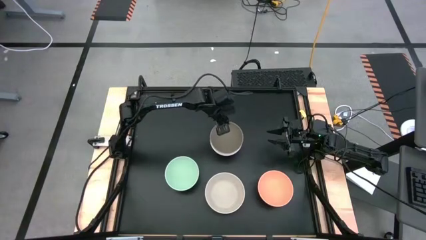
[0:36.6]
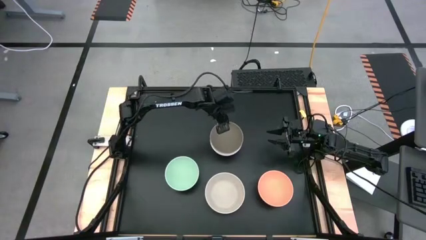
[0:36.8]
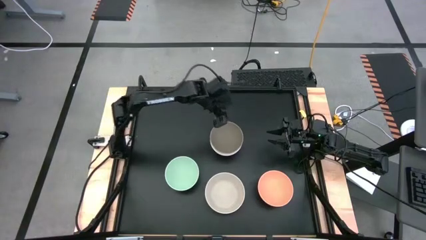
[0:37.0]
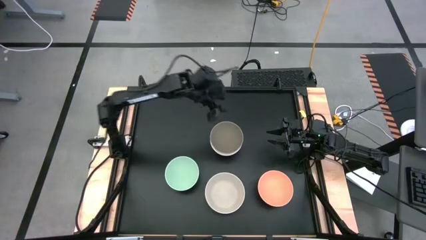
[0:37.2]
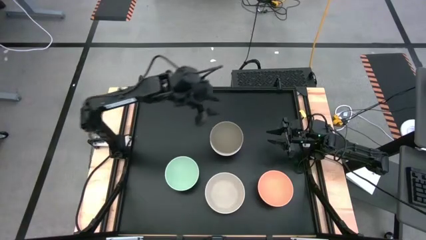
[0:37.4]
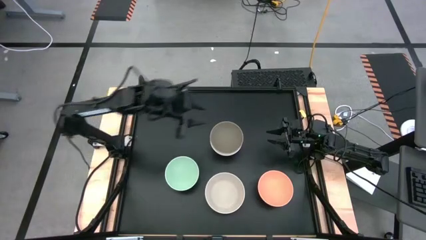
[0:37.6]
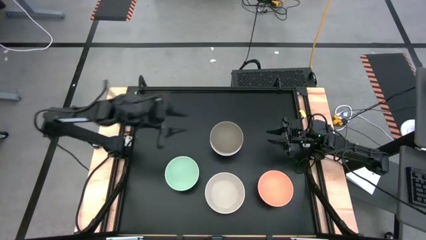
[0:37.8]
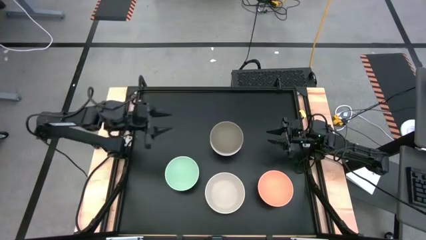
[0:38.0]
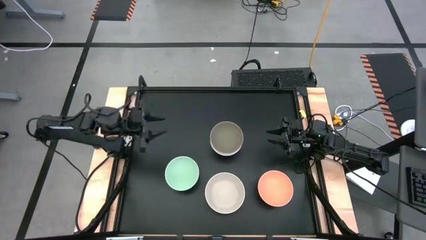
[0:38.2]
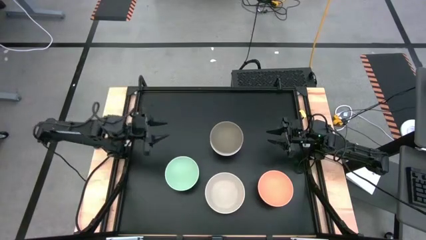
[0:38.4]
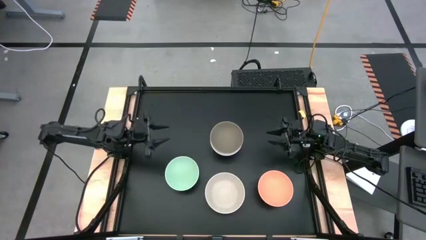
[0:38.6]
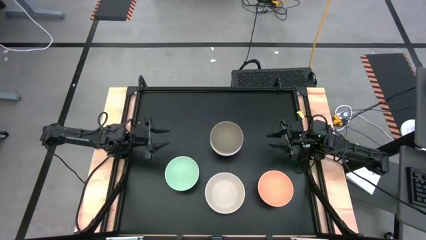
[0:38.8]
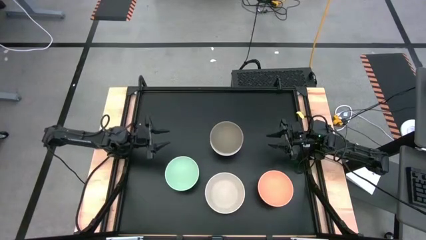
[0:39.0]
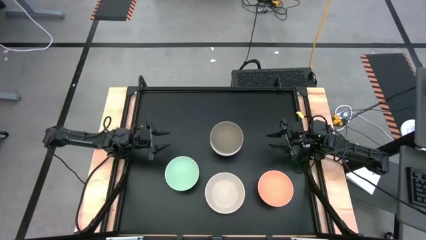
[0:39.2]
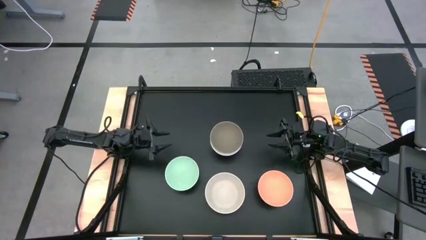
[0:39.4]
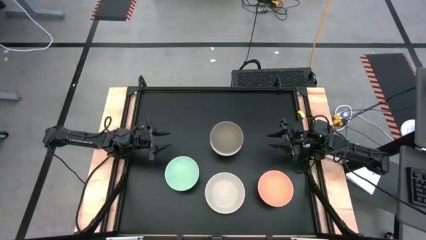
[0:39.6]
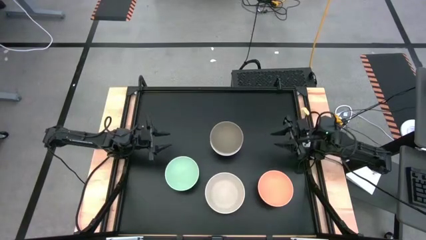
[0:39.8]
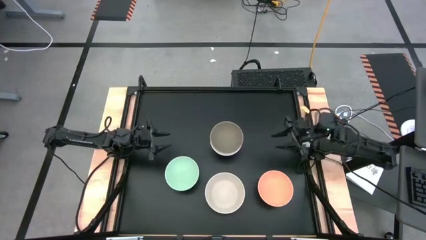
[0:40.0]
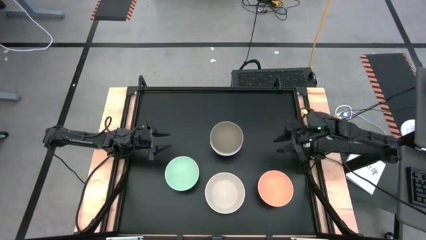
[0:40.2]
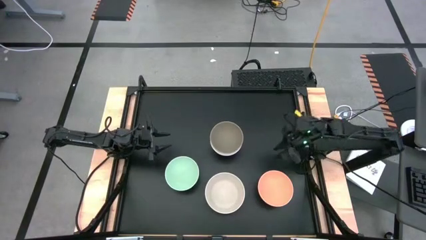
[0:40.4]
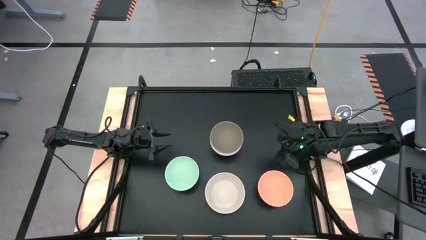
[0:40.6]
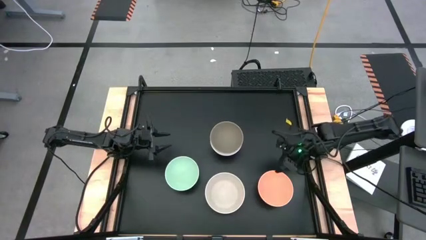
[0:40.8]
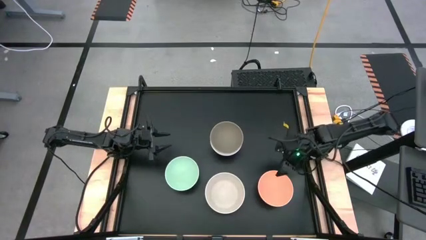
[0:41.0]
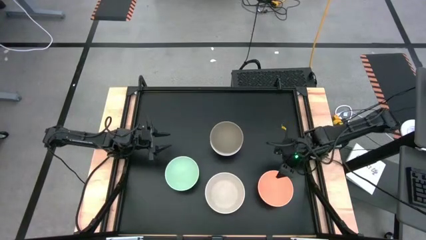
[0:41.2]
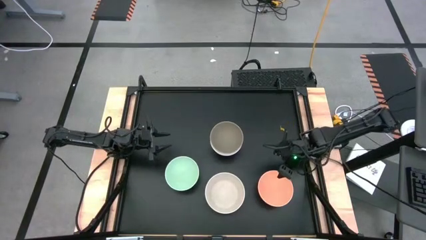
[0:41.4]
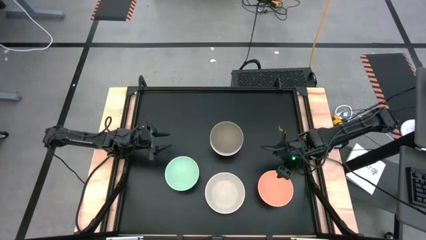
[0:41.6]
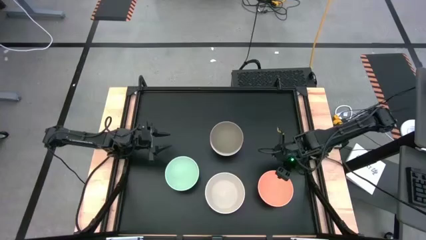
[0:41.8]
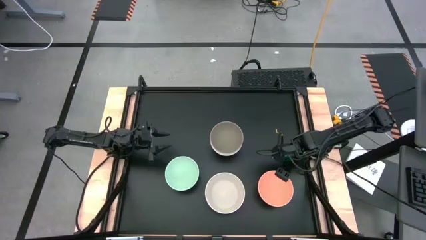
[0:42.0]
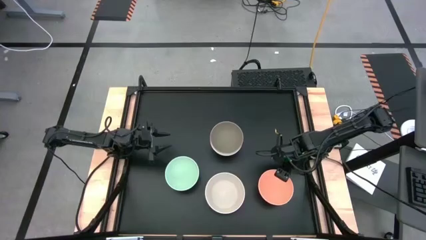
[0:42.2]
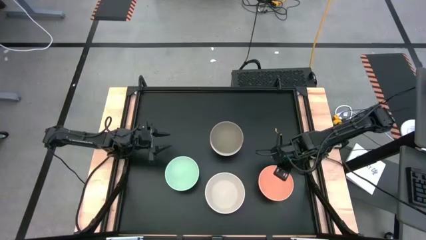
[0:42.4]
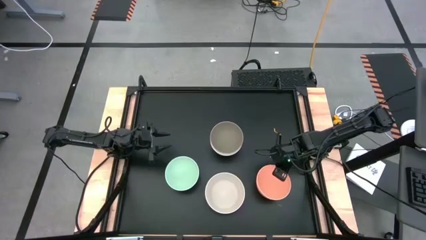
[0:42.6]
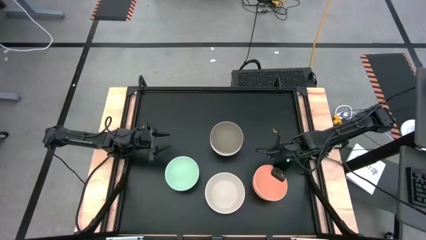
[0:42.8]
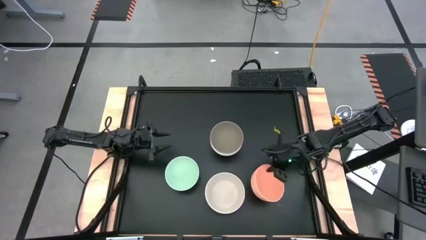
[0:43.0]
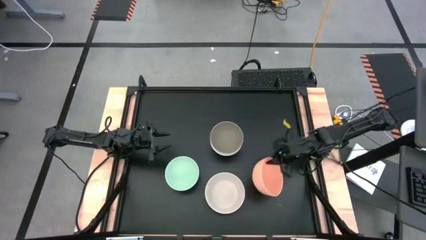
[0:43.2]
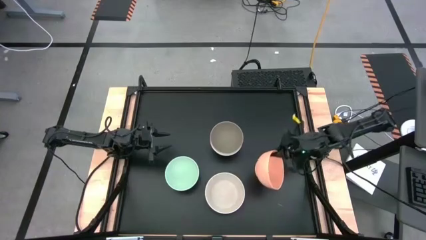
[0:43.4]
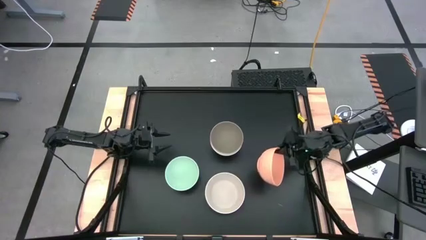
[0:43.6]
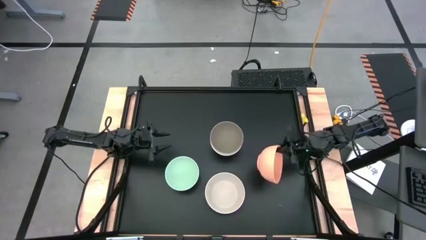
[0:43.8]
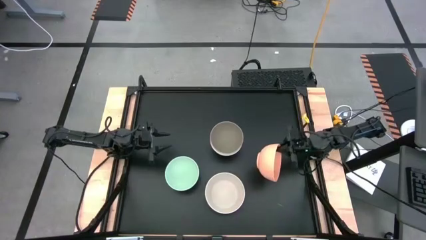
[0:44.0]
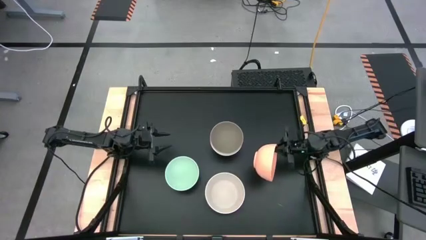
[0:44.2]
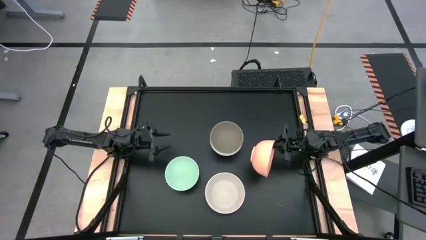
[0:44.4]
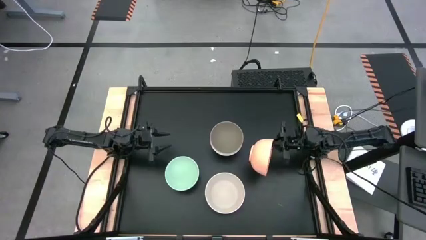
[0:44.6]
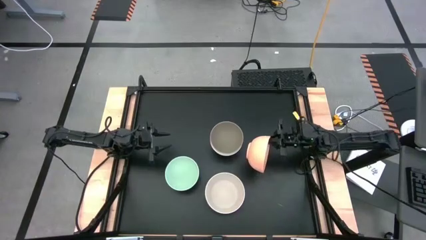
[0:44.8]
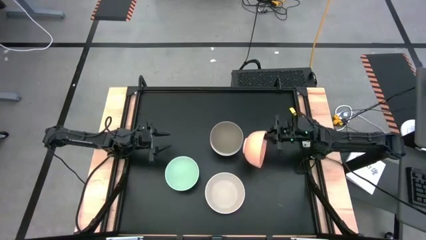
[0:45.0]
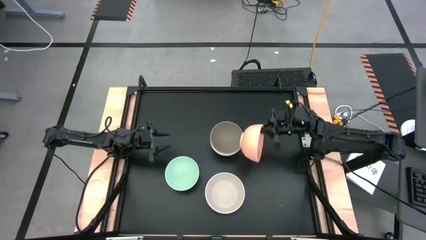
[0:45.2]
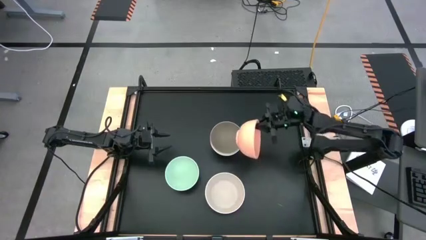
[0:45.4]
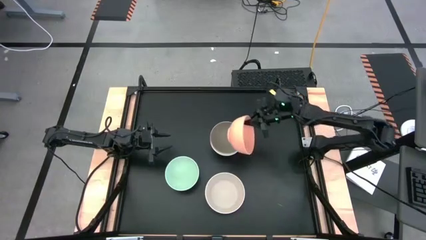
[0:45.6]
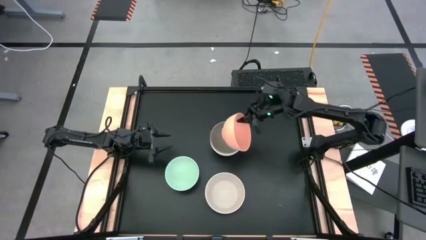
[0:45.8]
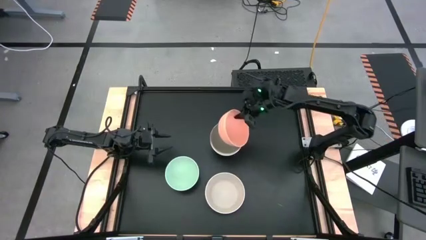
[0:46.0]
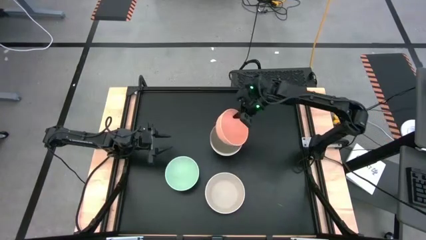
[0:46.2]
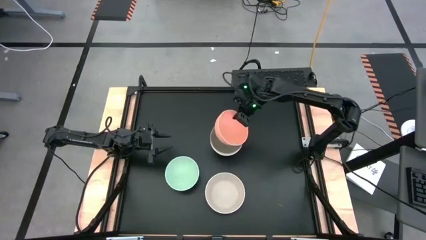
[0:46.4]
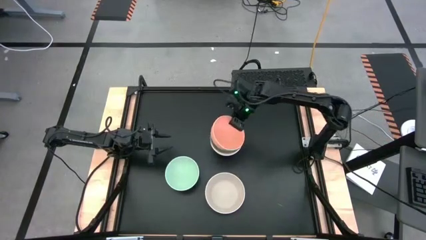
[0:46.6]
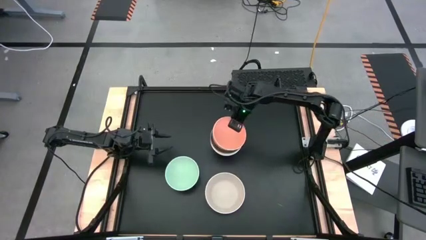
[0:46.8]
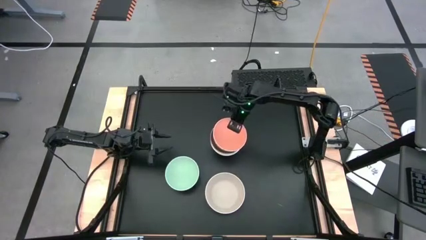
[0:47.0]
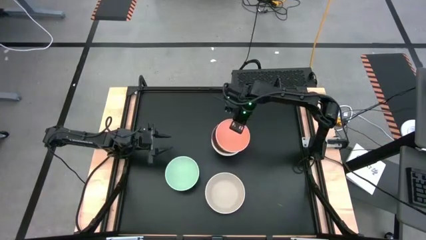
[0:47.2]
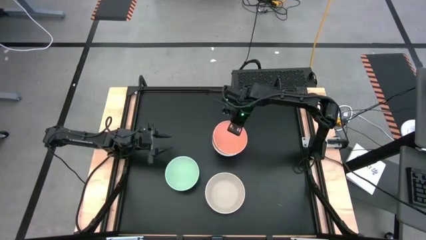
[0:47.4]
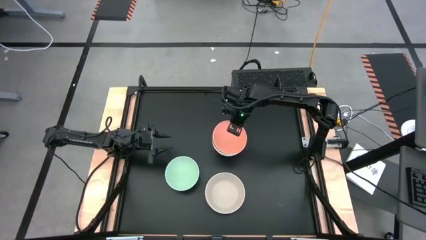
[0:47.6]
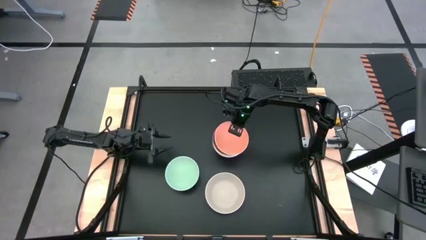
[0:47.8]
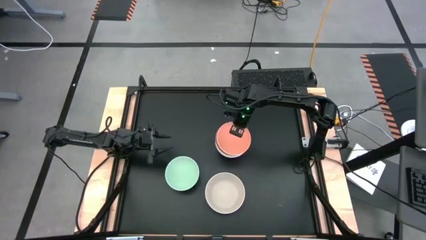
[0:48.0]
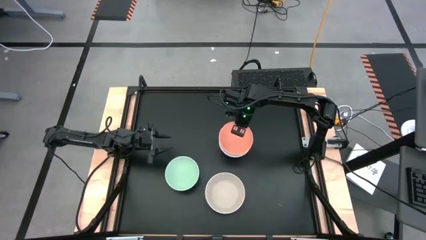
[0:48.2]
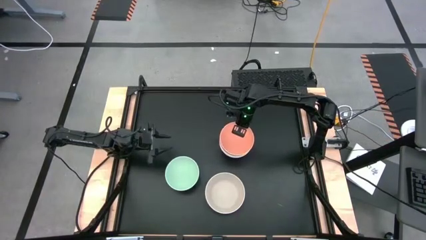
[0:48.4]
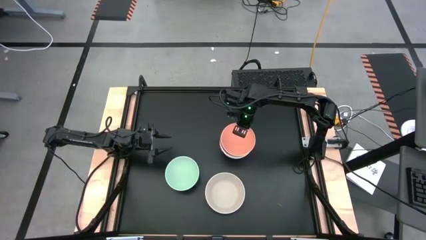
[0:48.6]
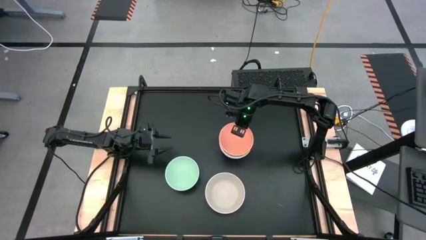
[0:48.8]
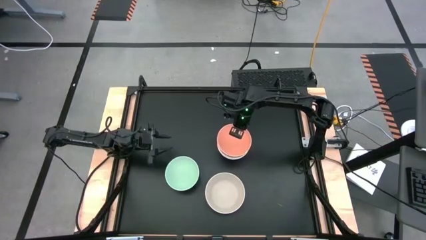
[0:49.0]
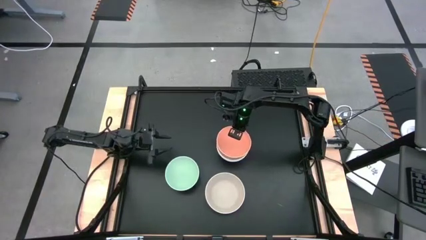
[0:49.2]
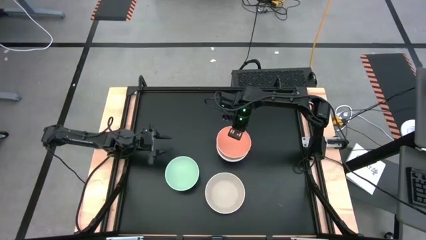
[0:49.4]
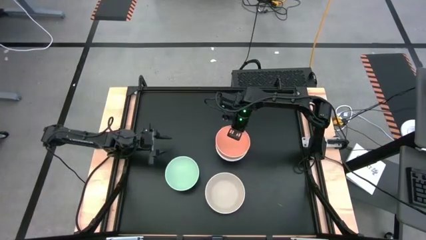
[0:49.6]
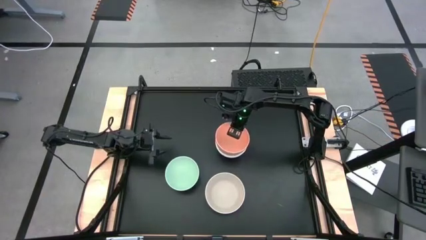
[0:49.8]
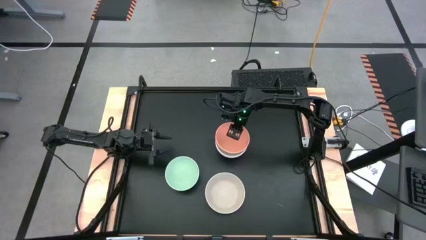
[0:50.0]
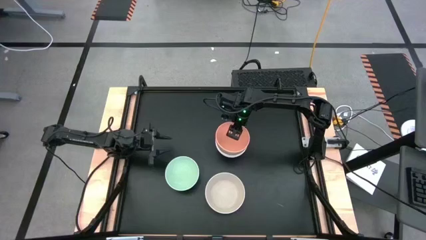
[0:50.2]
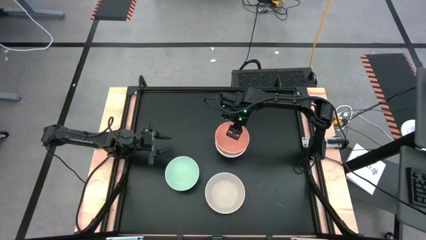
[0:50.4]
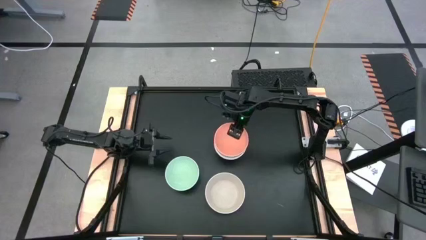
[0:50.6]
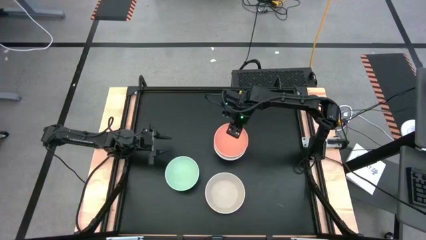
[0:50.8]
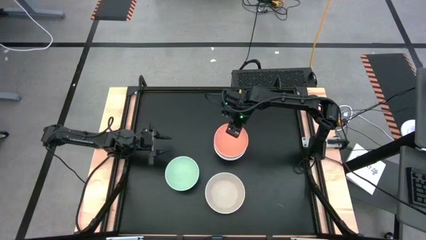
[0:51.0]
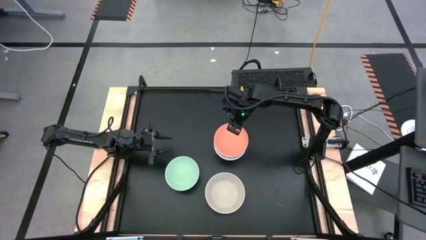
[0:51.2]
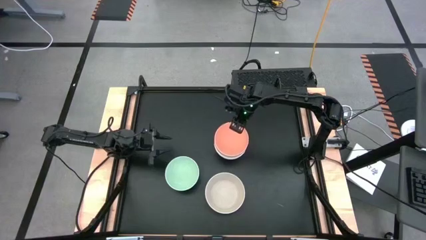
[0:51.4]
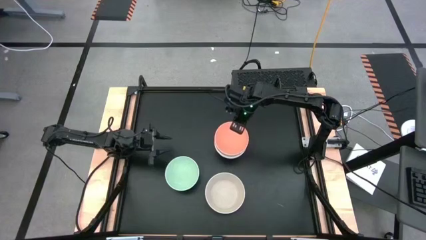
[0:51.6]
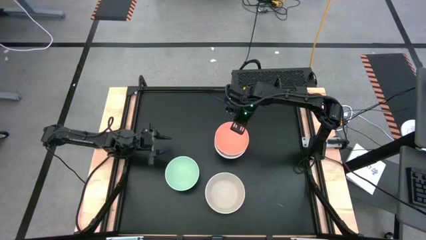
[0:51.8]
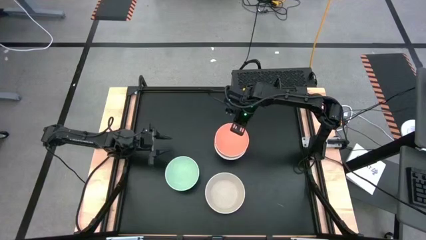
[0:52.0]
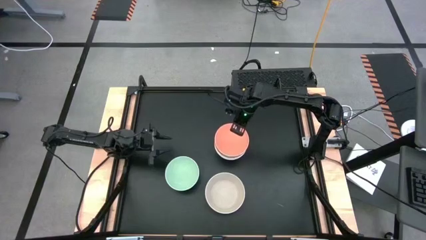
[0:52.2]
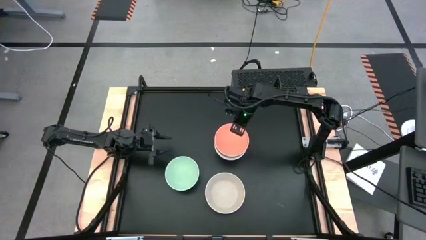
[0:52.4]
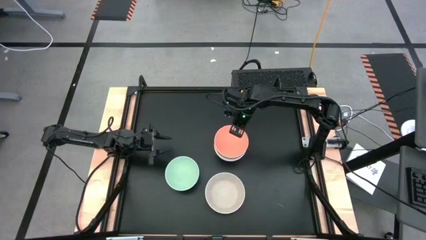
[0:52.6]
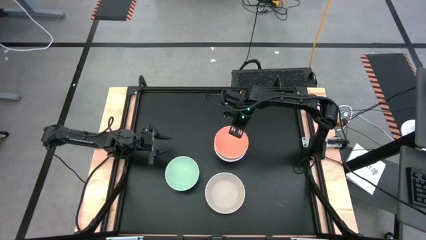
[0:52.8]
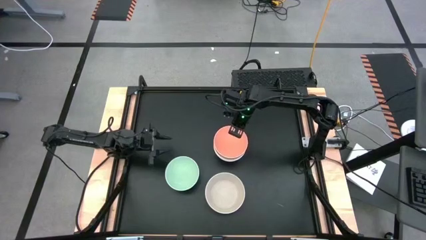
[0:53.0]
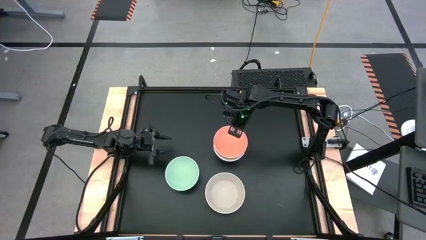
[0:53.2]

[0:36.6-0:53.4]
Task: Nest bowls inside each other
Stack the orange bowl on the stacked brown bowl
